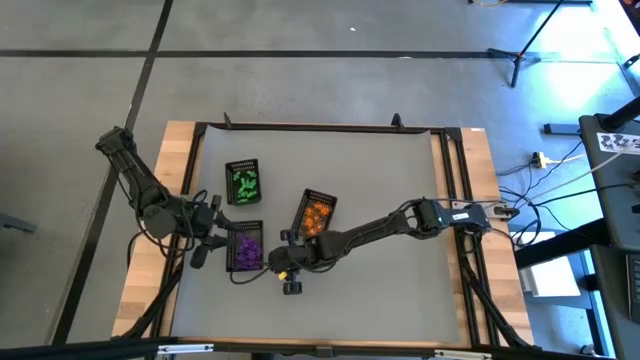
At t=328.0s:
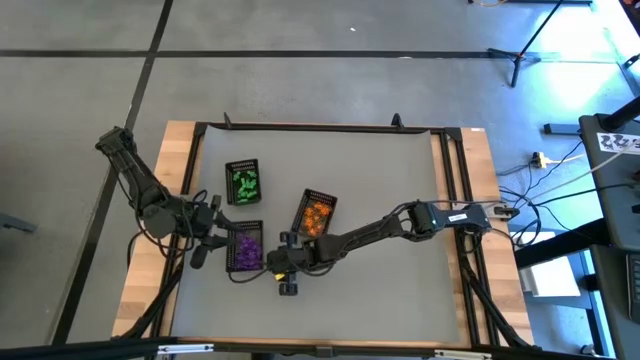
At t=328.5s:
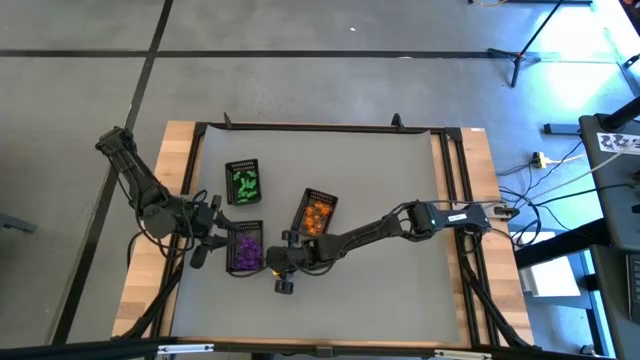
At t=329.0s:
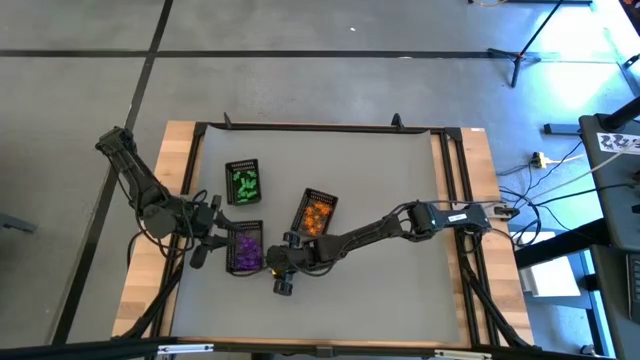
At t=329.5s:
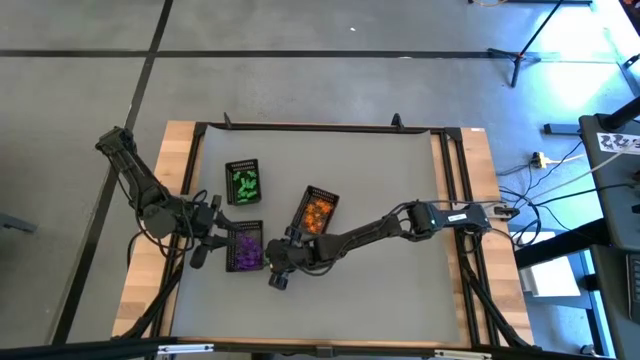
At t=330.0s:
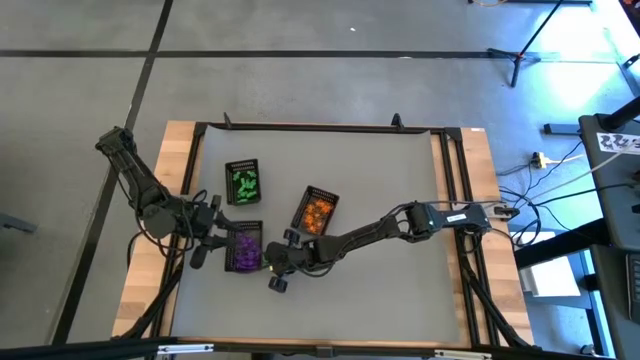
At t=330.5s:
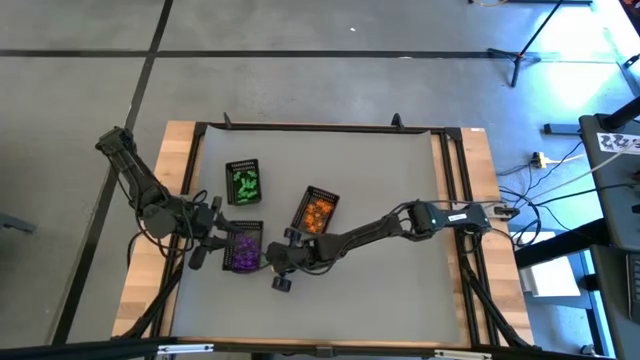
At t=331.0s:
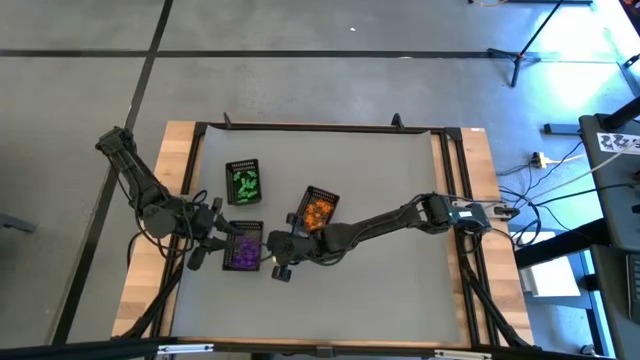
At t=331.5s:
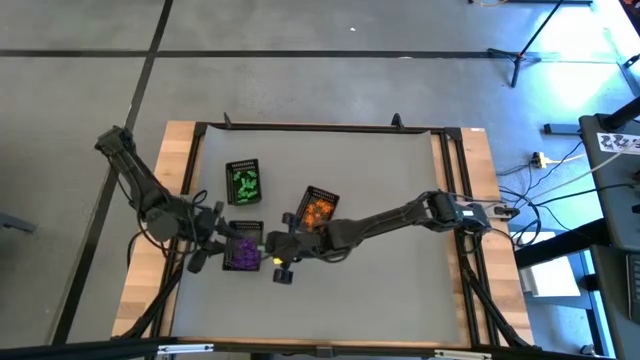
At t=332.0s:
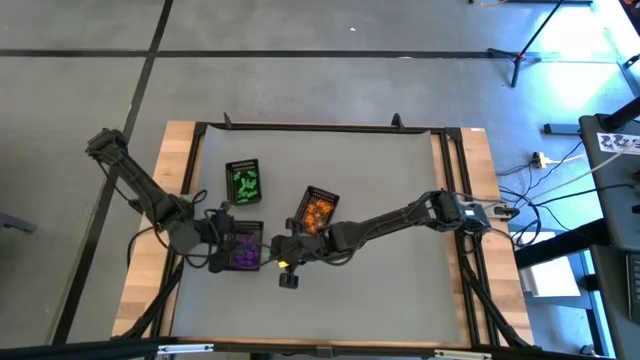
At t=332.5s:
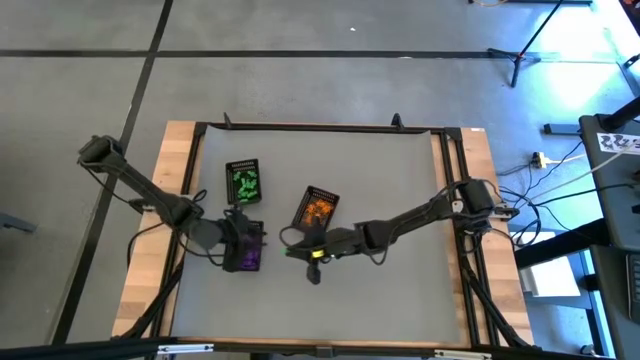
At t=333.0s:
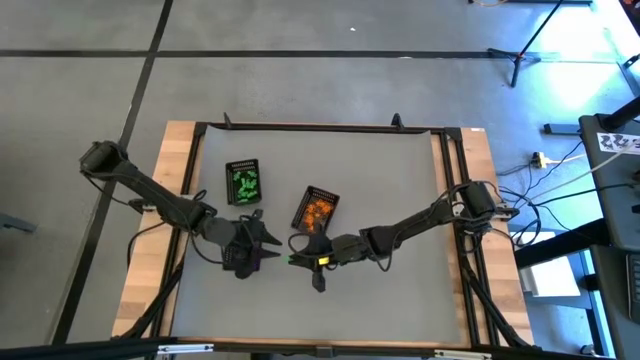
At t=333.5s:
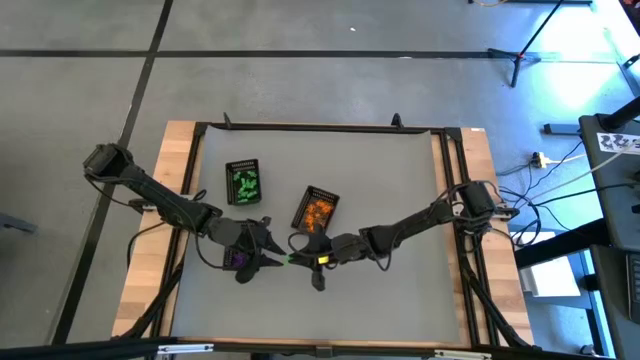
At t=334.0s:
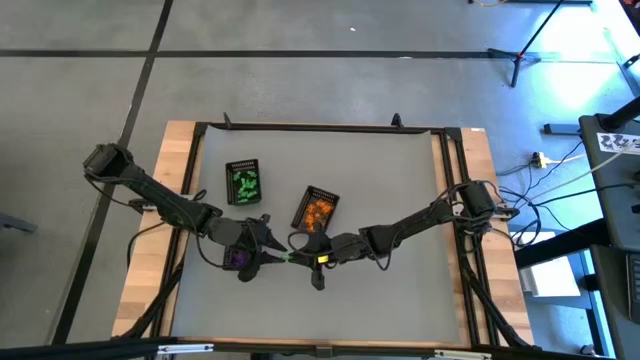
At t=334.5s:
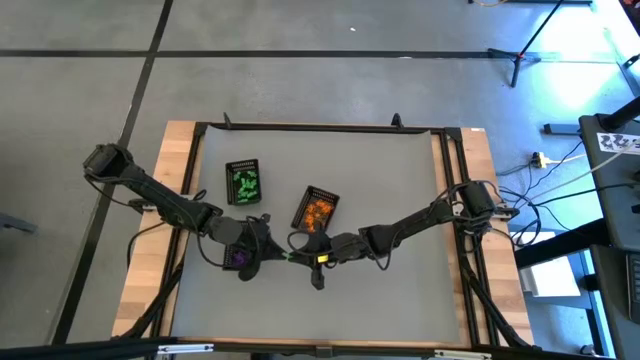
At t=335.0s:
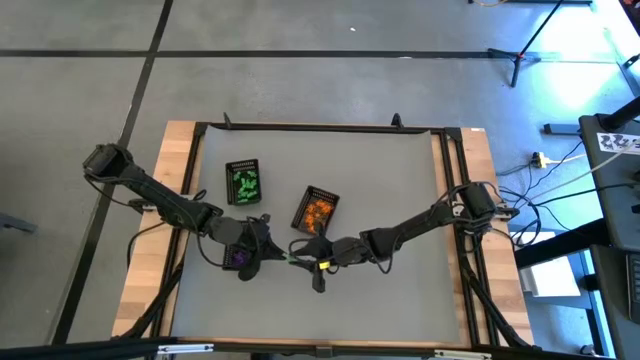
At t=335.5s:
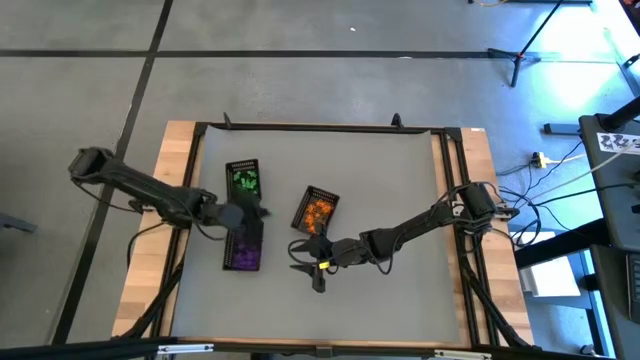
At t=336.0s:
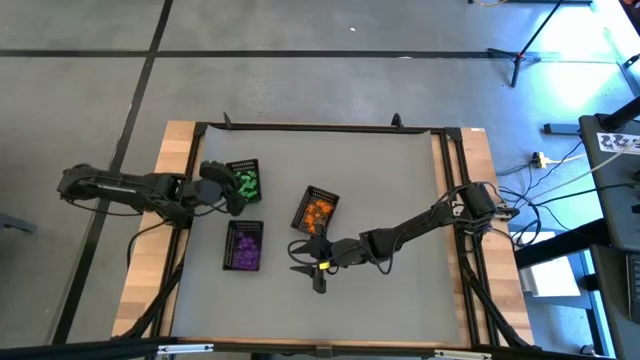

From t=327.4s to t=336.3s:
Task: Sort Halloween decoration
Put the green alien toy into the top left black basket

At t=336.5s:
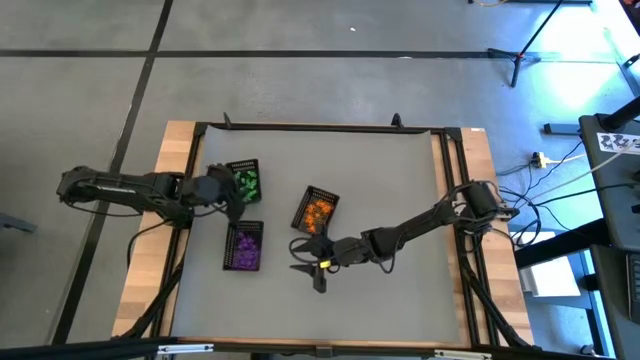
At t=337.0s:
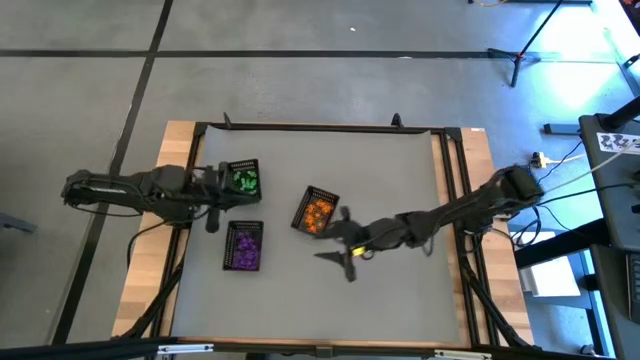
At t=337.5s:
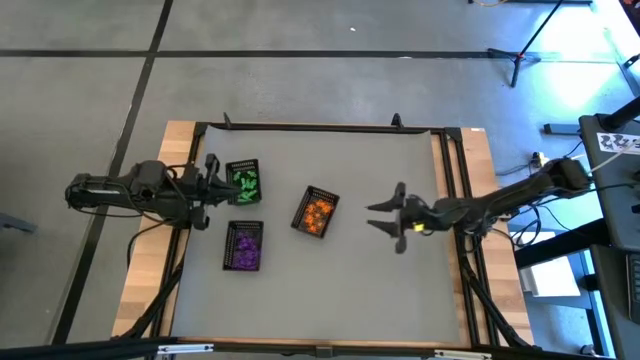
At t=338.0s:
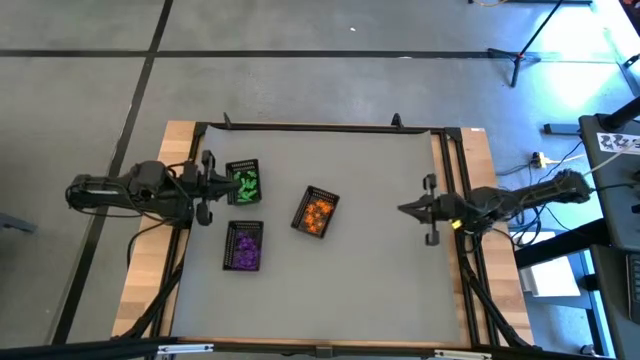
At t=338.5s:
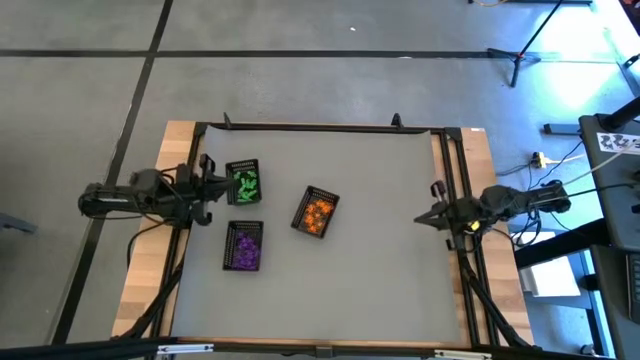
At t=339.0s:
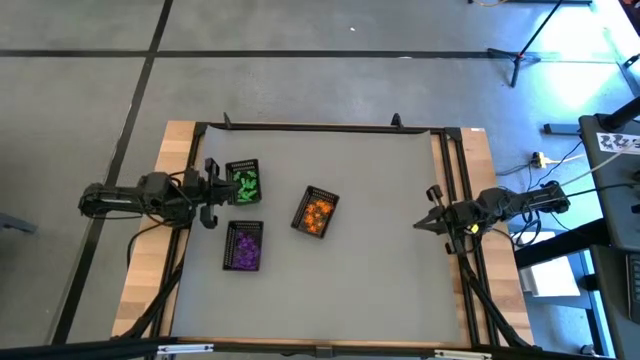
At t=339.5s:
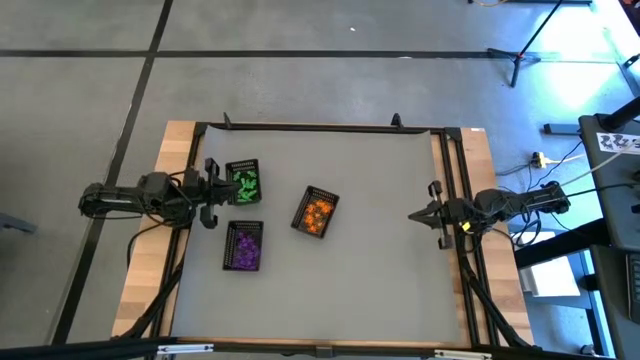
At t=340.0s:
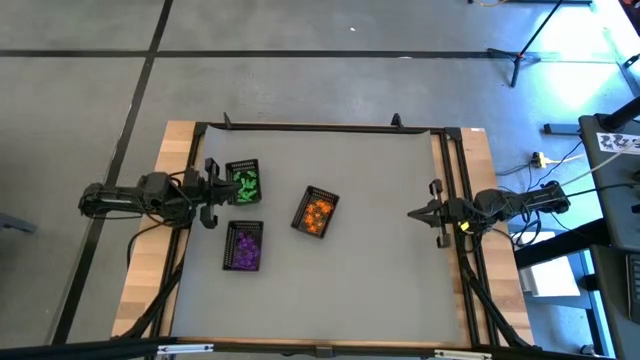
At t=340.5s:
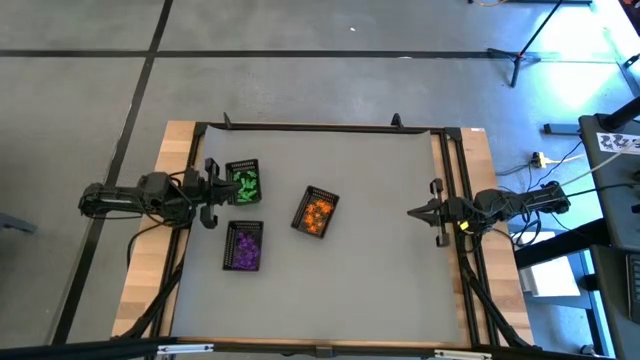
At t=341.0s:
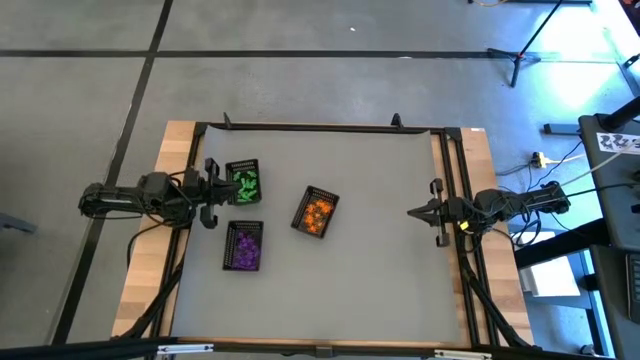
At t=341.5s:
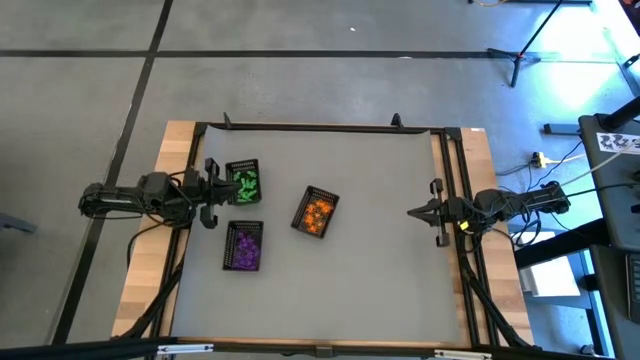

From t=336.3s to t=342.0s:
Return to Home Position

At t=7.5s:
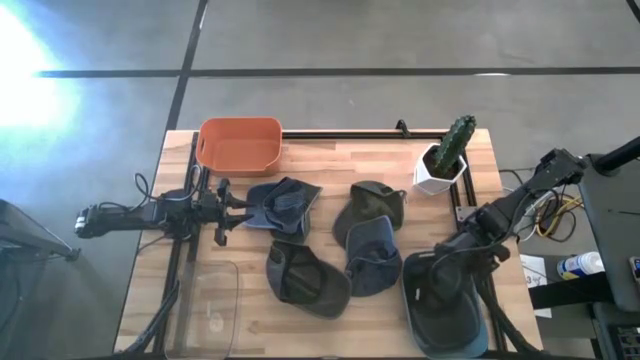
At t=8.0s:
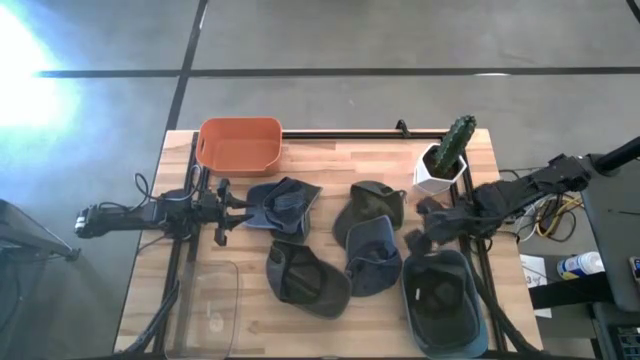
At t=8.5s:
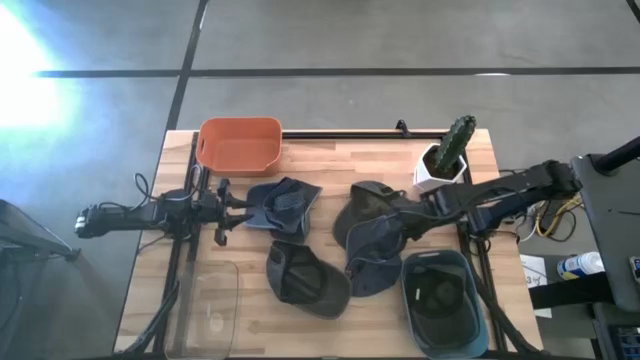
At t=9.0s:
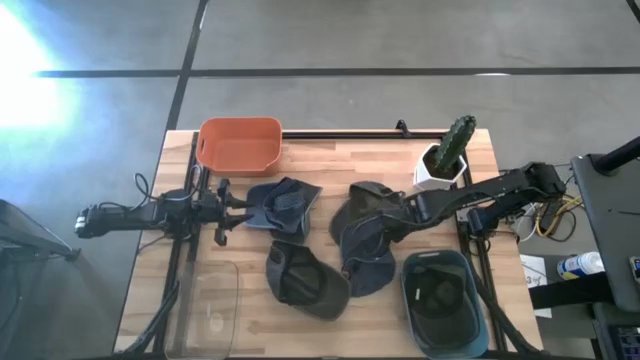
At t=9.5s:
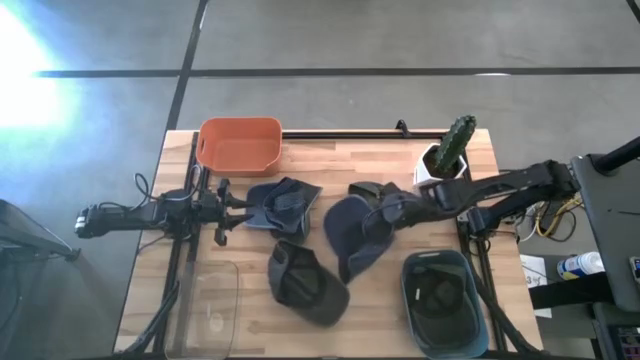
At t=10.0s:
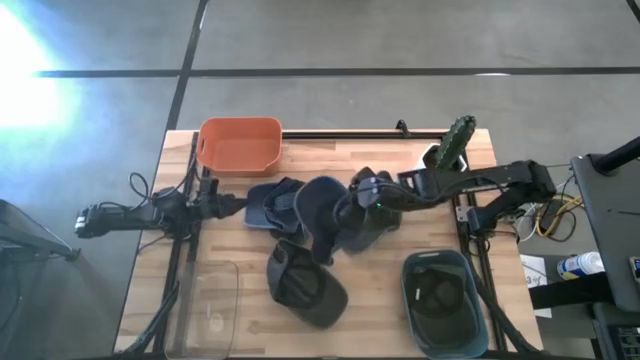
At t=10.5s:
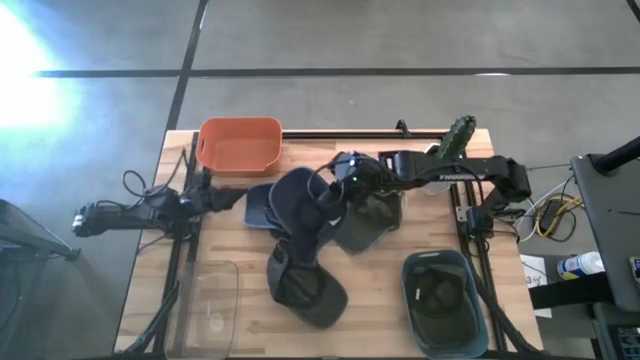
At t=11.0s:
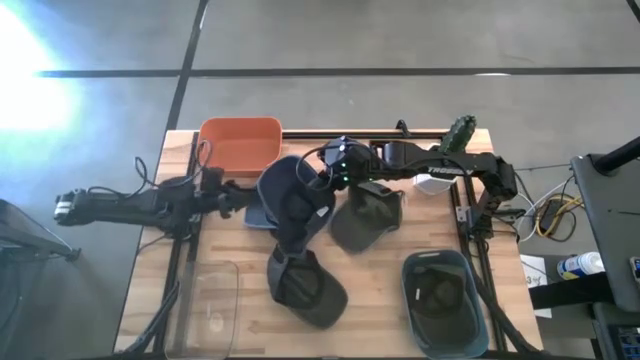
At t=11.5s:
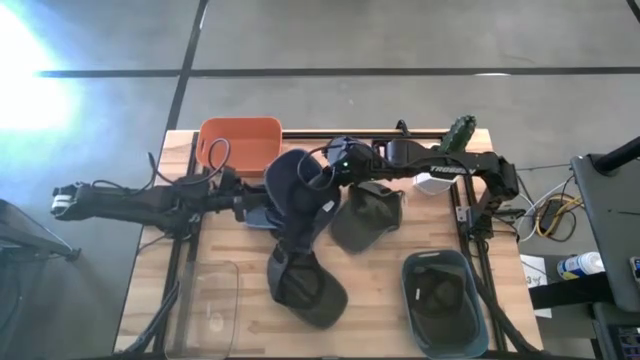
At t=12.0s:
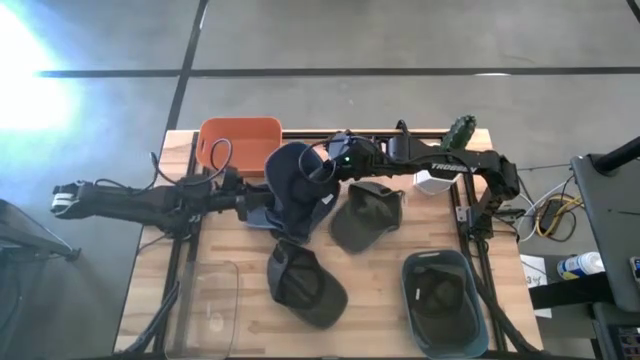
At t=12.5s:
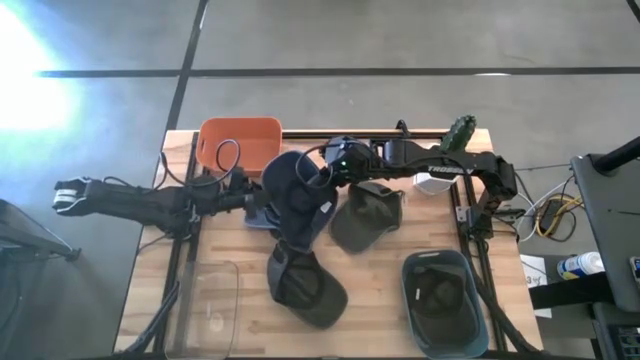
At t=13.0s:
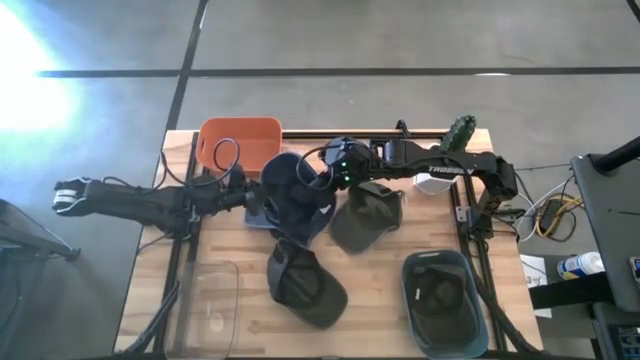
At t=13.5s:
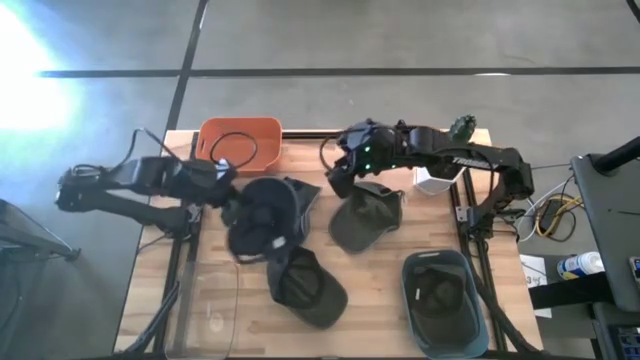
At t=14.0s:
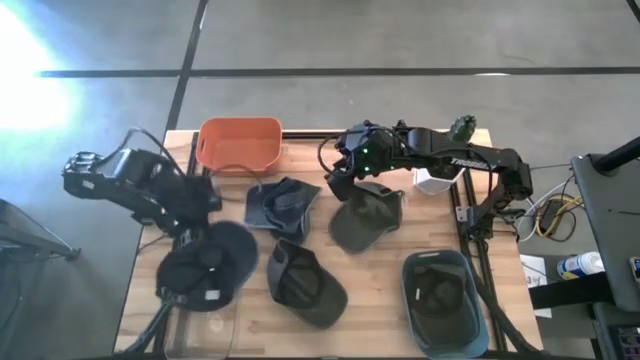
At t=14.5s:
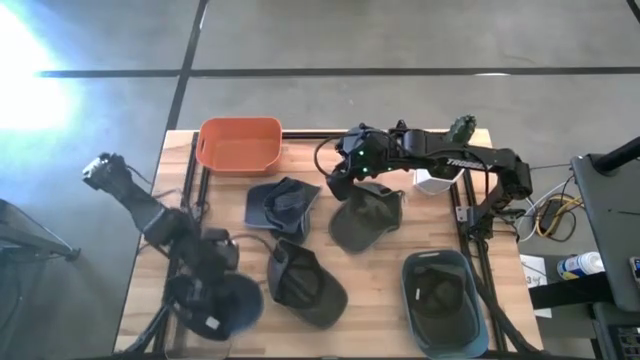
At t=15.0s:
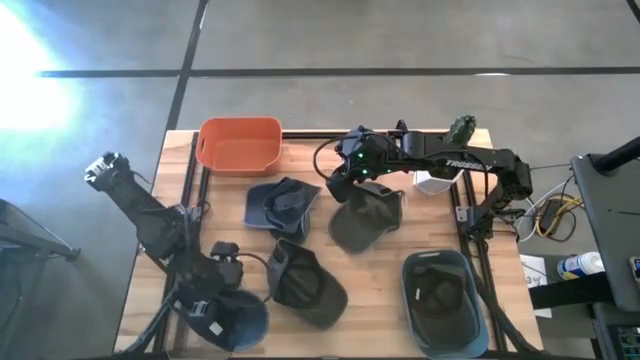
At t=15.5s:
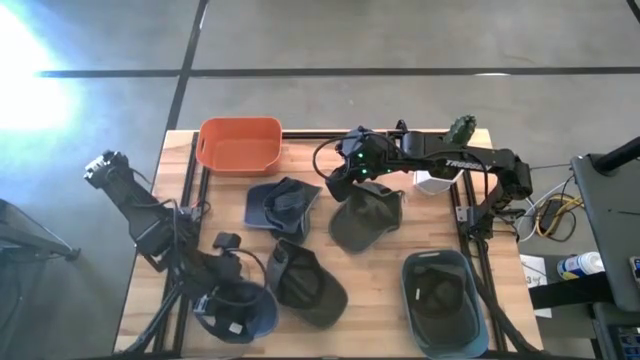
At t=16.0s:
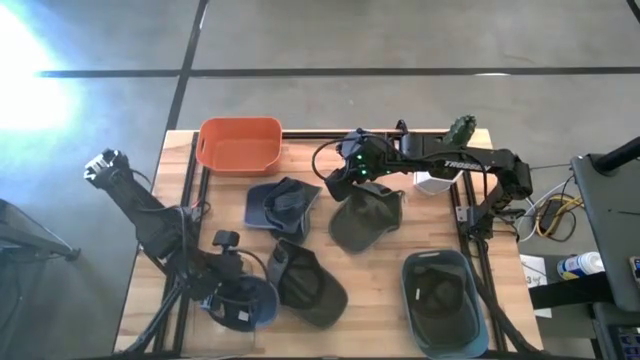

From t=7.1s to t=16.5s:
Task: Pick & Place hat
Put the right blue cap into the transparent bin
